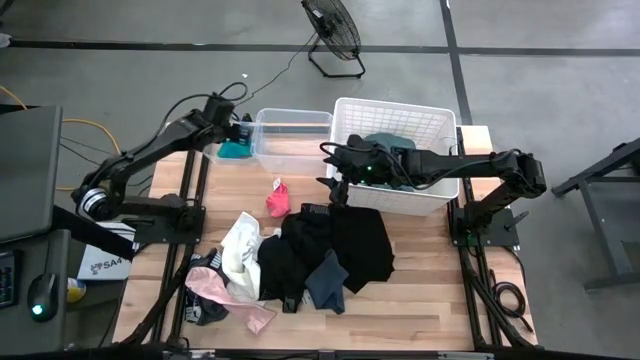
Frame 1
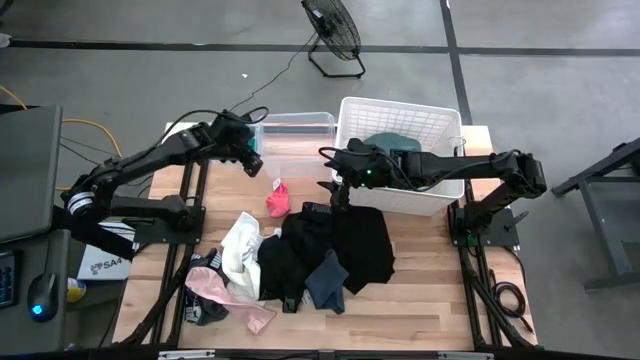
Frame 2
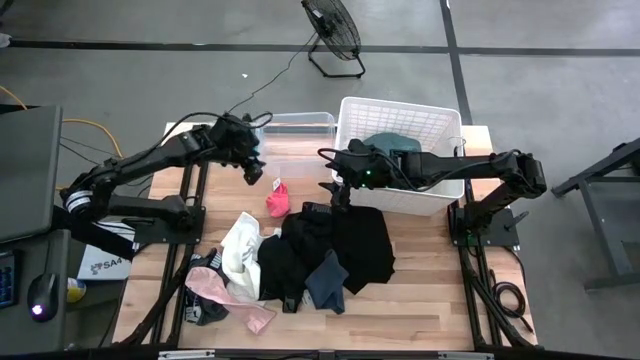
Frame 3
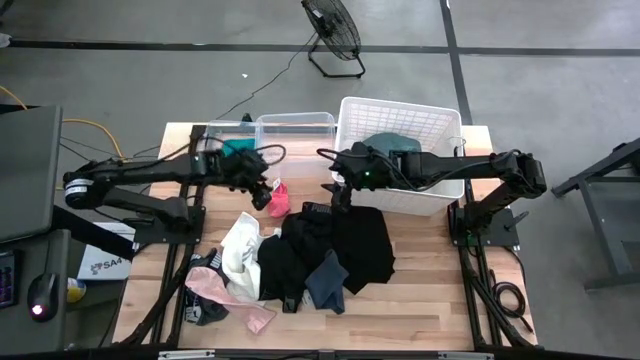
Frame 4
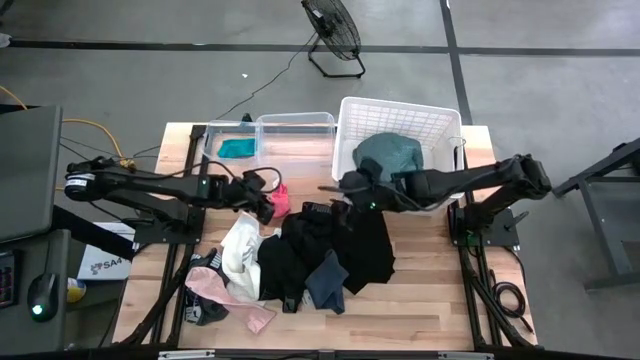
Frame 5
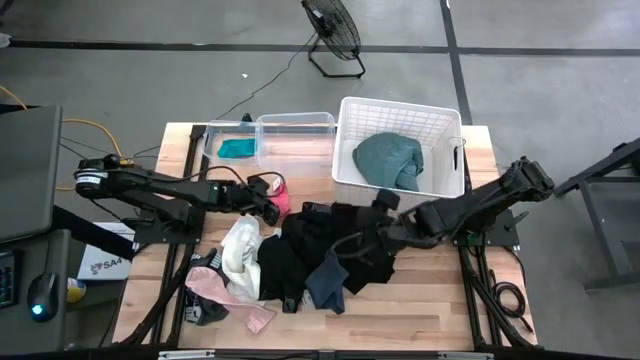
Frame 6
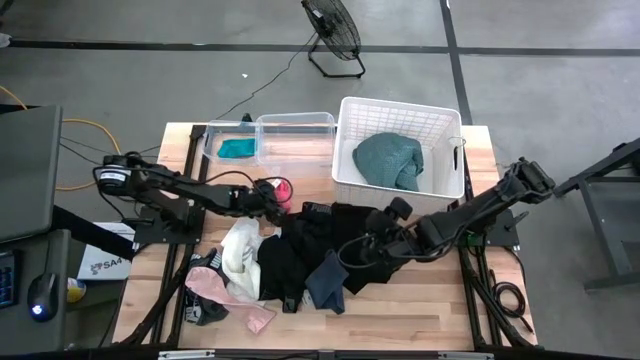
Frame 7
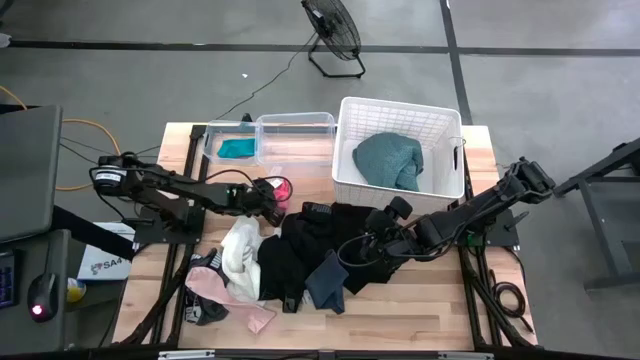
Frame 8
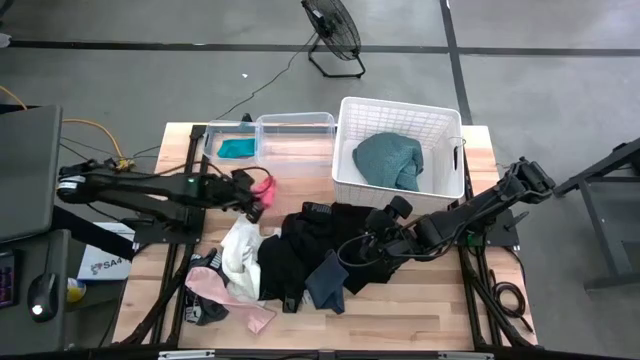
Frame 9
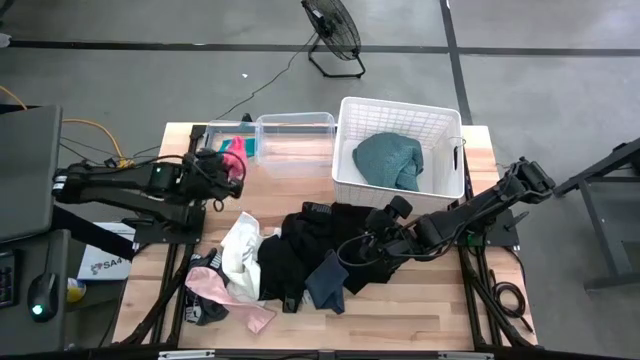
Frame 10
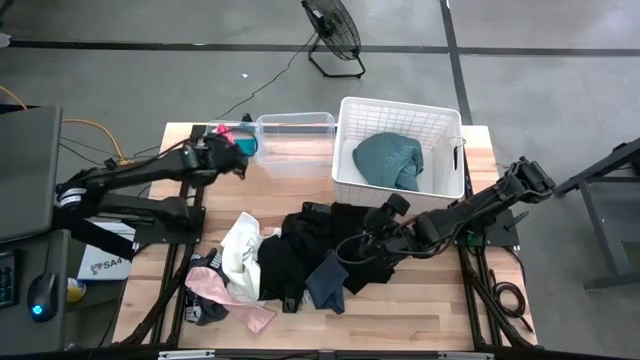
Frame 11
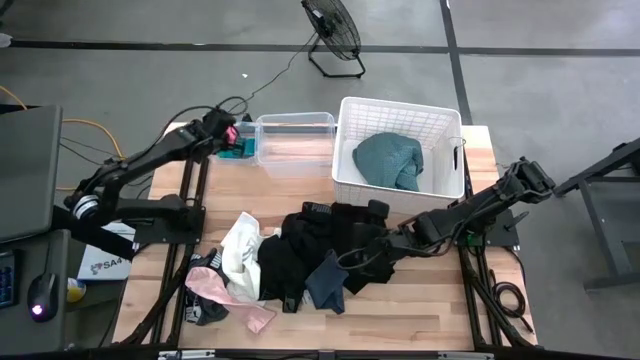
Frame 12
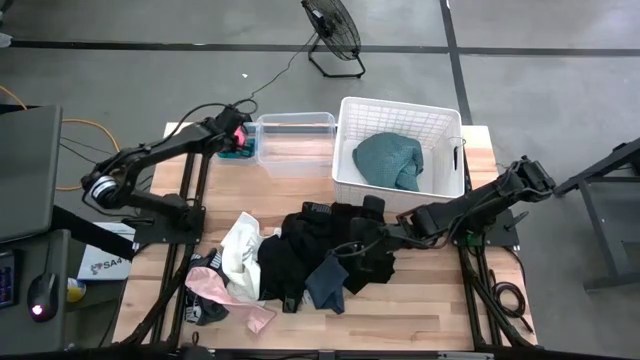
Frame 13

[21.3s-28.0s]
Task: Pick & Place Cloths
Put the orange sock into the left transparent bin

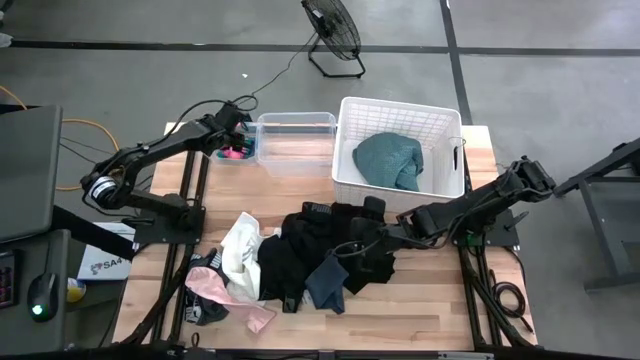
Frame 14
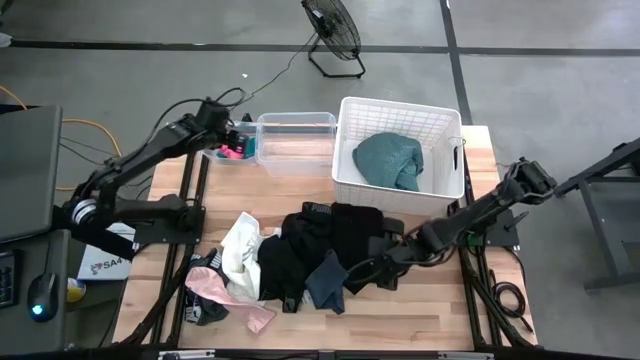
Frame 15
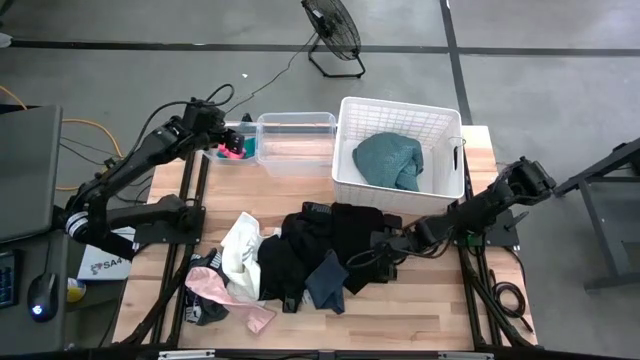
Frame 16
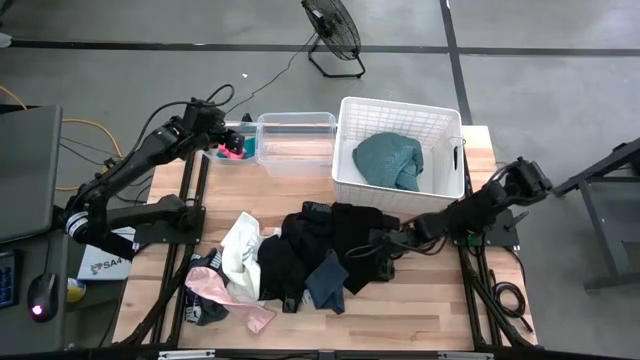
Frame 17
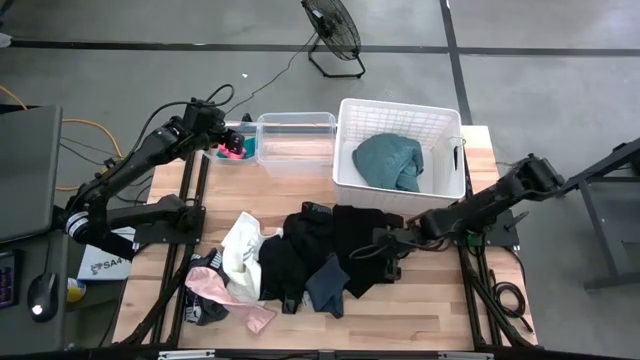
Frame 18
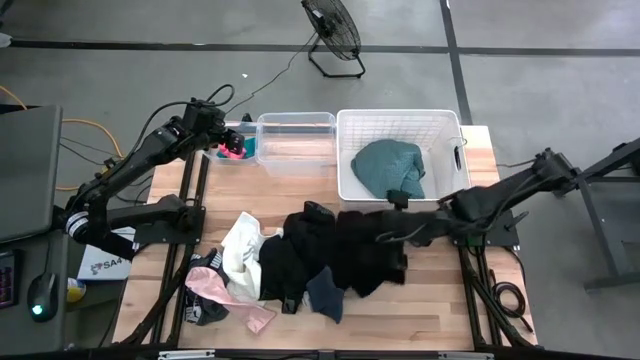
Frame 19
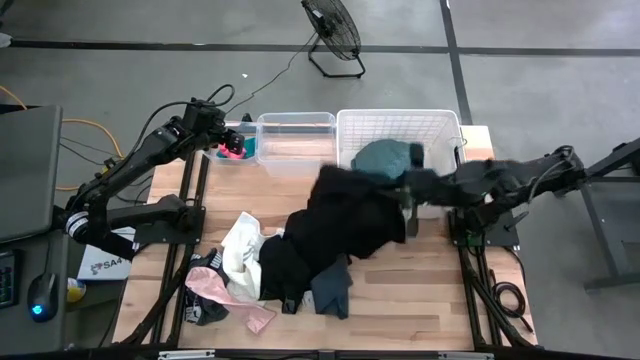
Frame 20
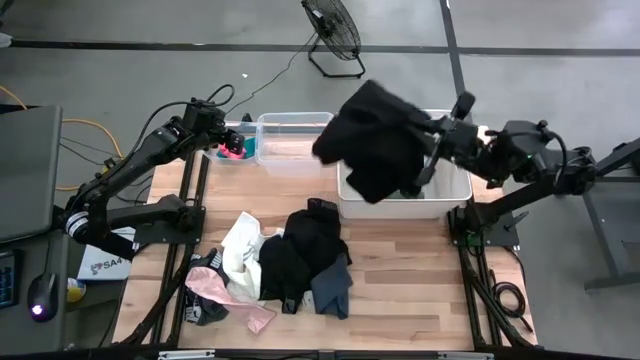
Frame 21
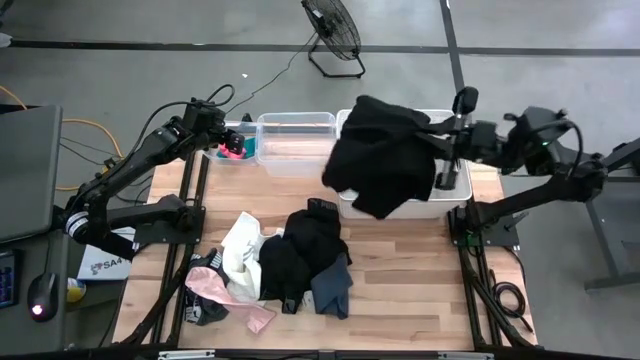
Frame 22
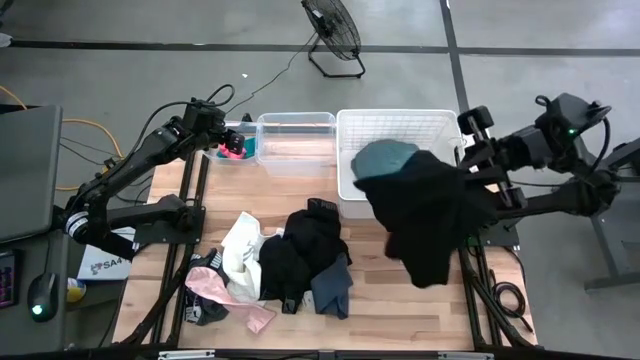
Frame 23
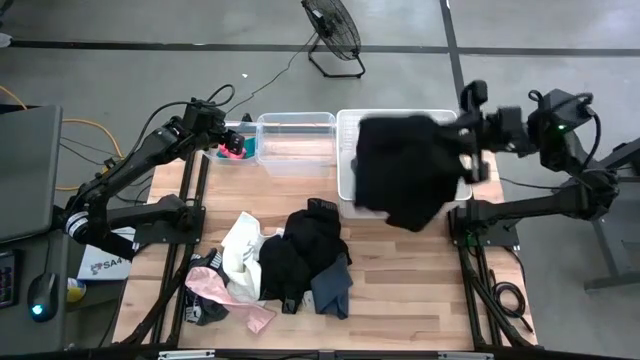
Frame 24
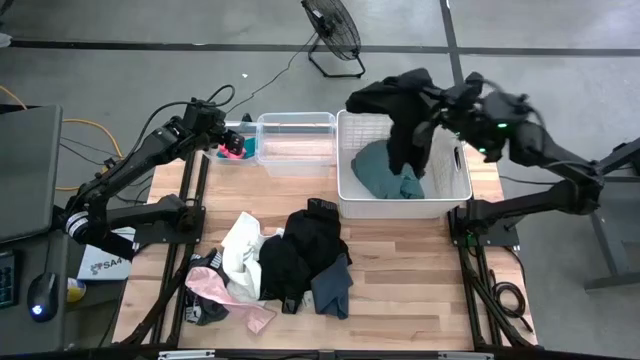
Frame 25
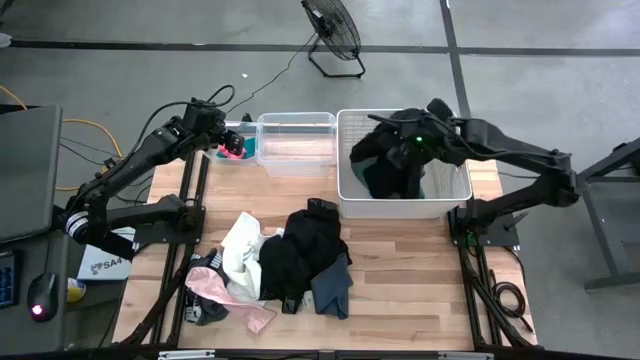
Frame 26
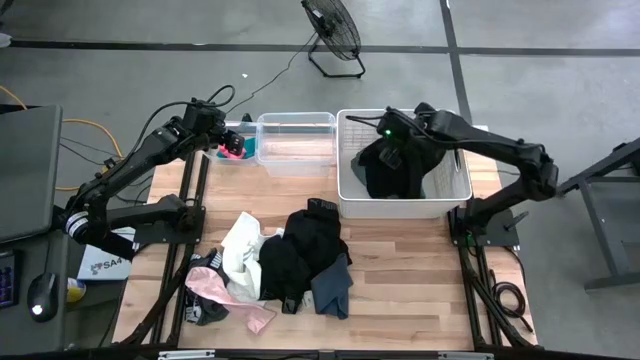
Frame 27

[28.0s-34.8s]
Put the black shirt into the white laundry organizer

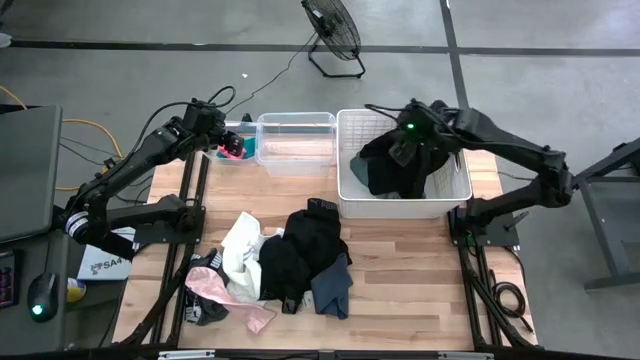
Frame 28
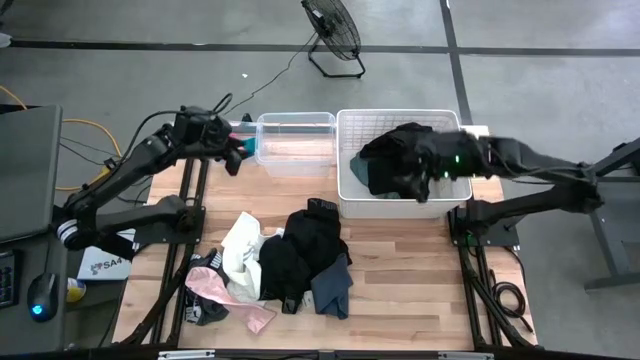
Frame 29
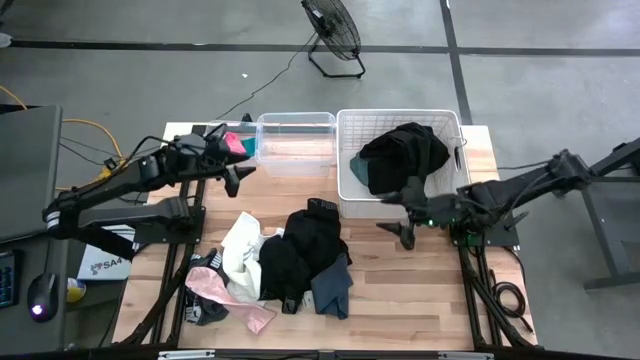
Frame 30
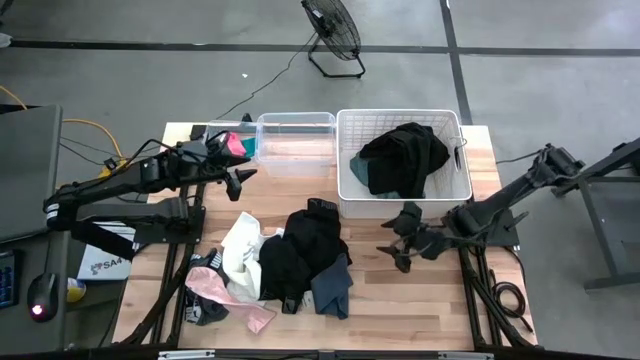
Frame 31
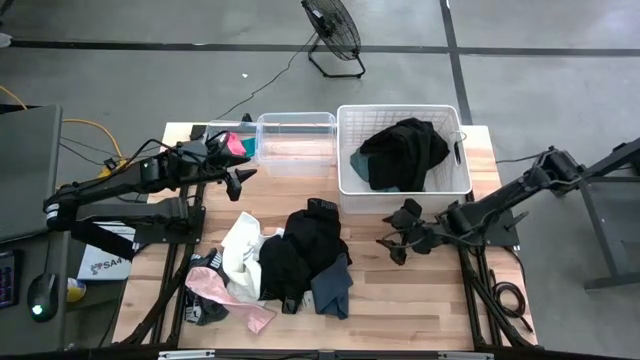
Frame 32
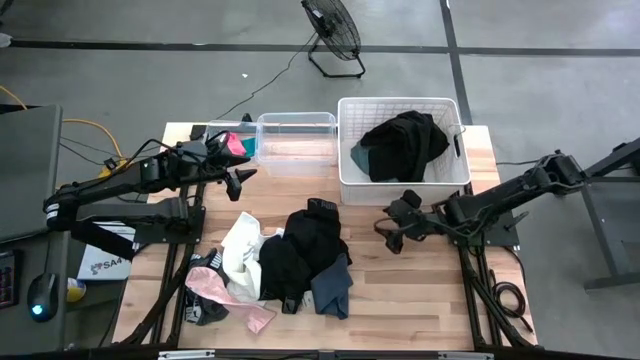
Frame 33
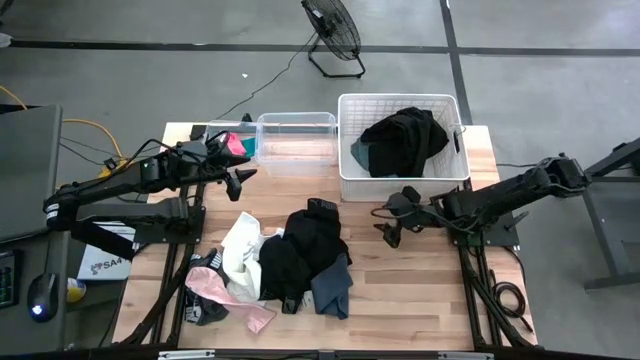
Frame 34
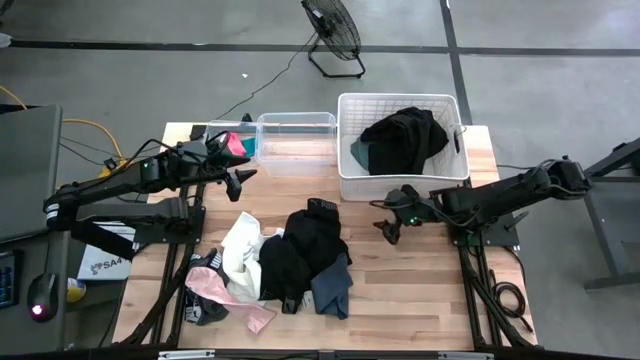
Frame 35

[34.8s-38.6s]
Adjust the white laundry organizer on the table

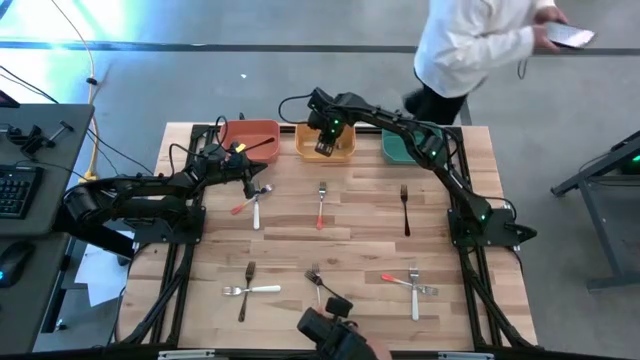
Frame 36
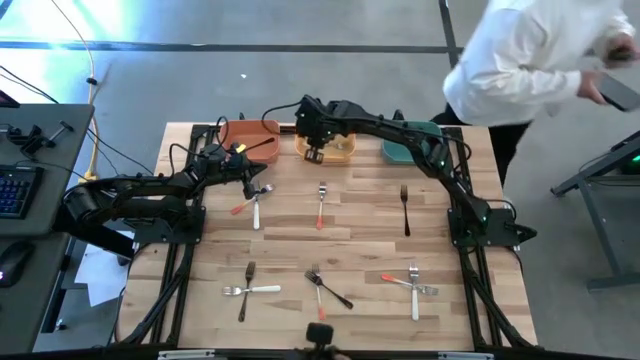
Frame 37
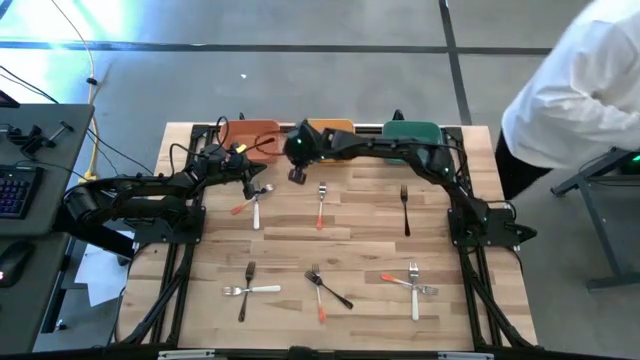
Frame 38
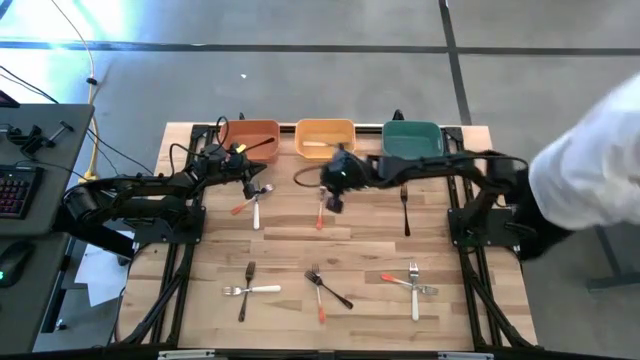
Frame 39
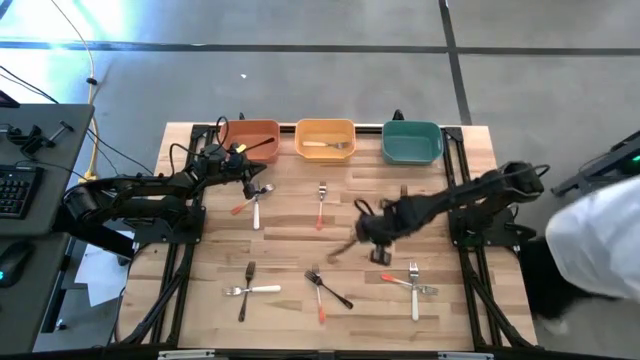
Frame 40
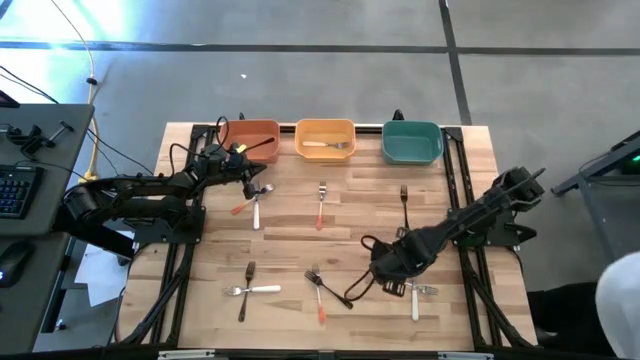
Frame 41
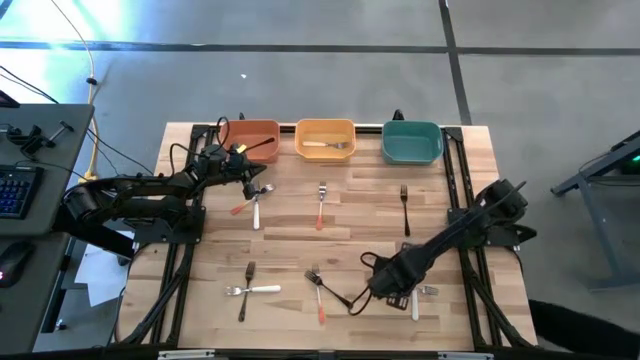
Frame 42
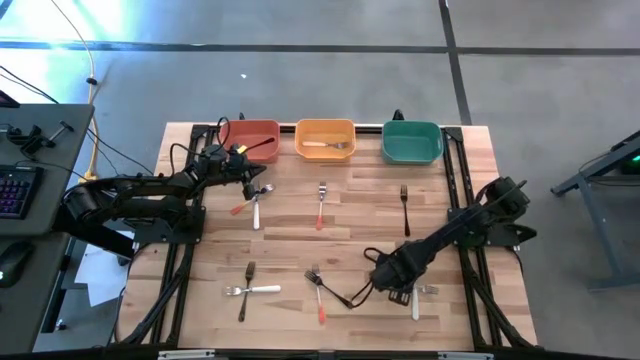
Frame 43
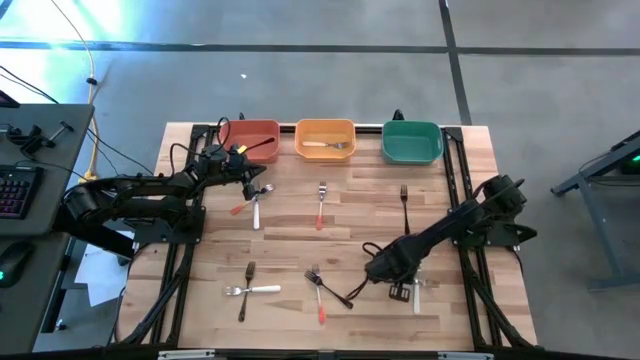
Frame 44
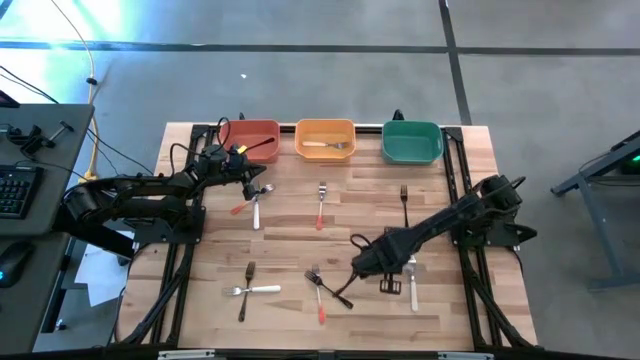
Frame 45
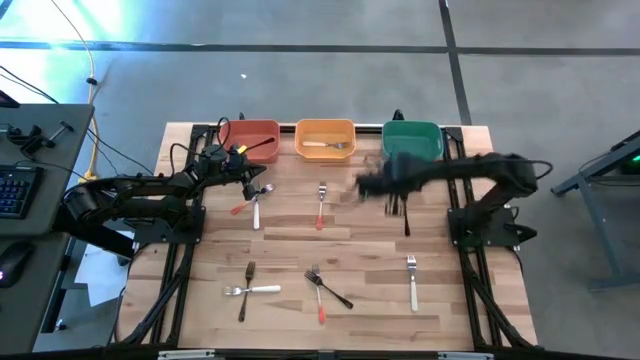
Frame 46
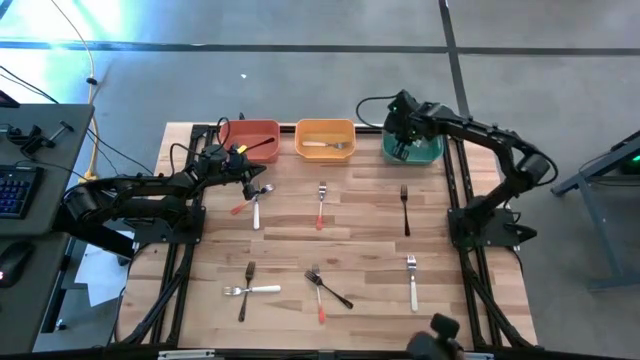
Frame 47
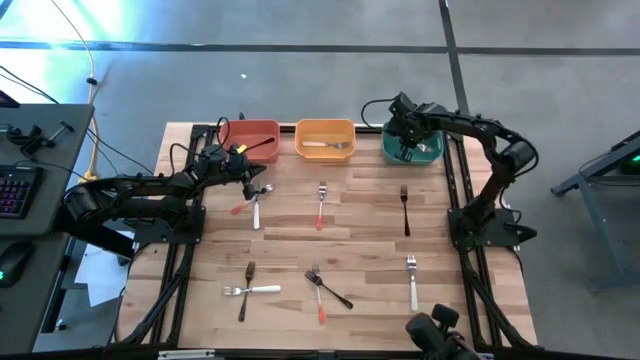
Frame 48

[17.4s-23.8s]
Task: Sort silverware by color (type)
Put the bottom right orange fork into the green bin
